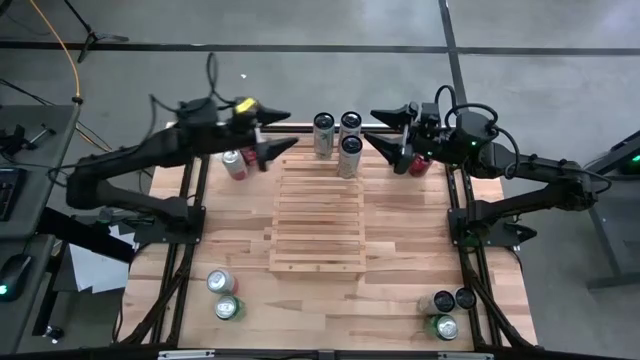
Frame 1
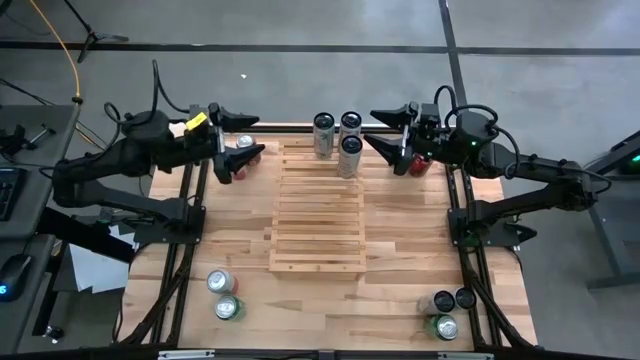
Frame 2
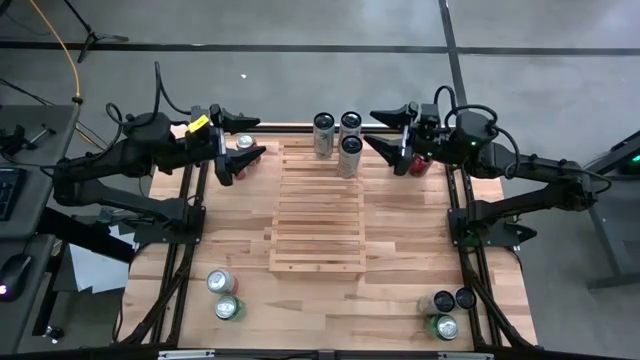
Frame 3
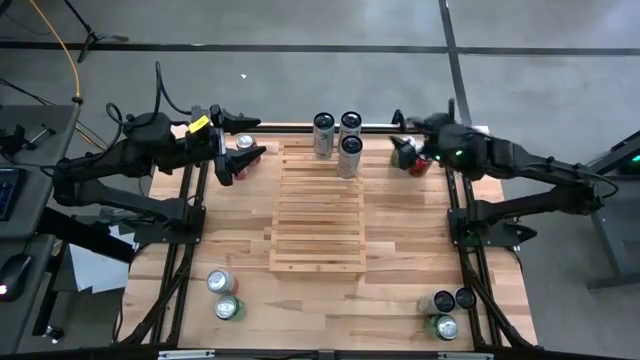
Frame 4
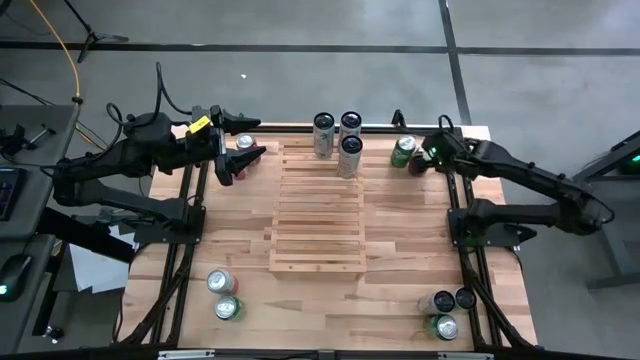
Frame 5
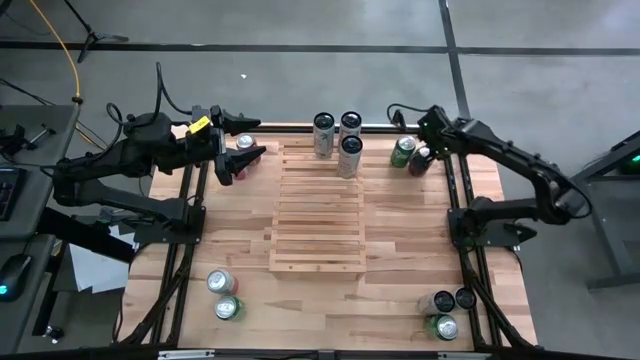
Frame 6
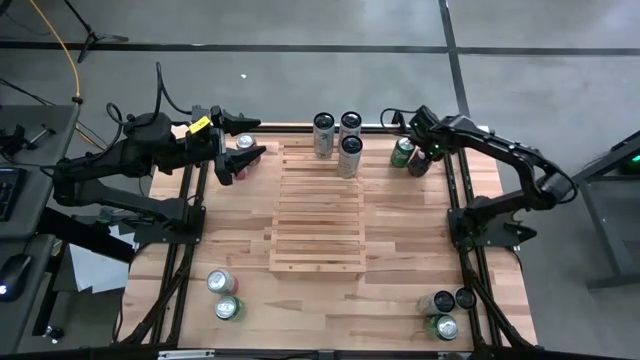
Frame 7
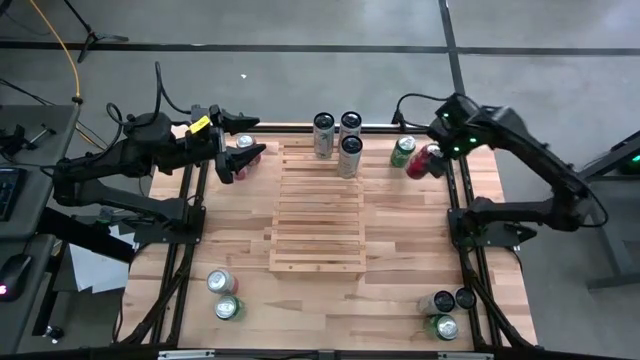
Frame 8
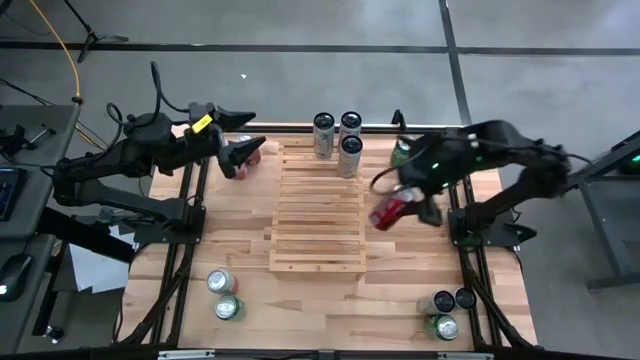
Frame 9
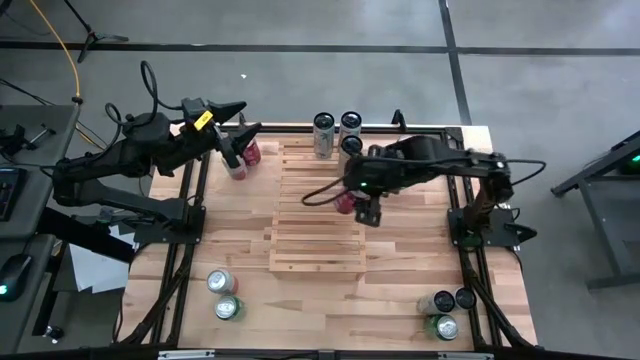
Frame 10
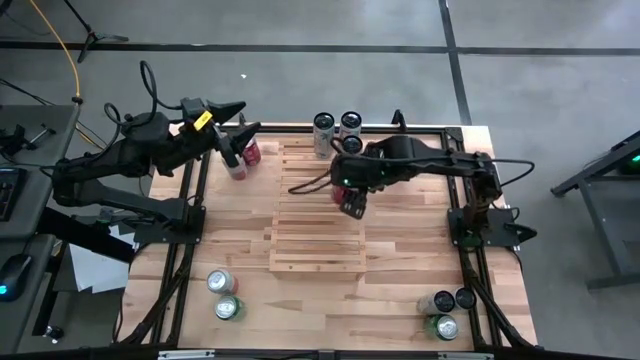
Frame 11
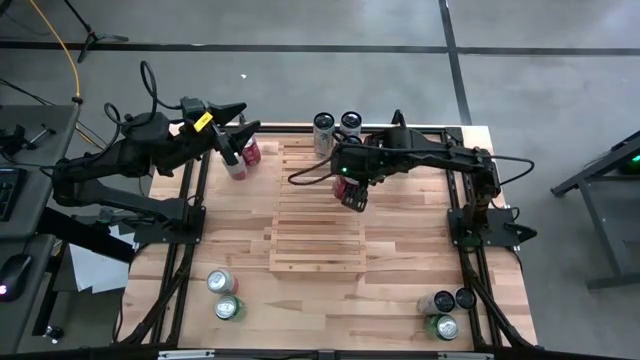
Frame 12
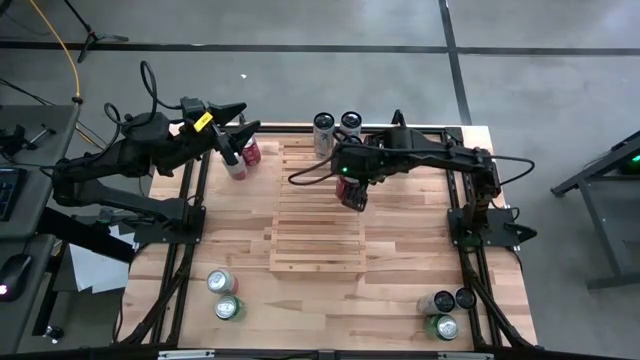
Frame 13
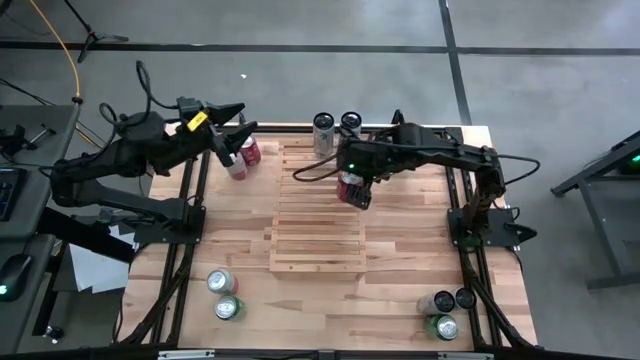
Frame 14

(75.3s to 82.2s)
Task: Place canned beverage on shelf
Put the red white soda can on the shelf

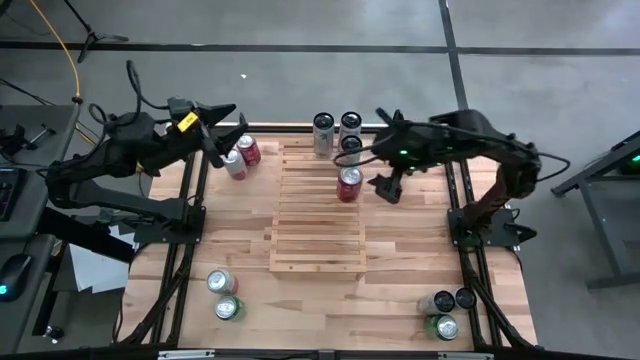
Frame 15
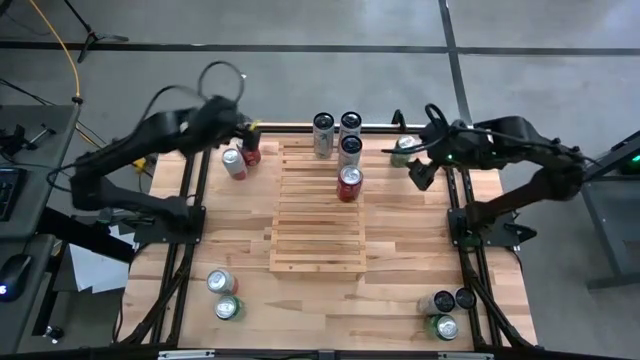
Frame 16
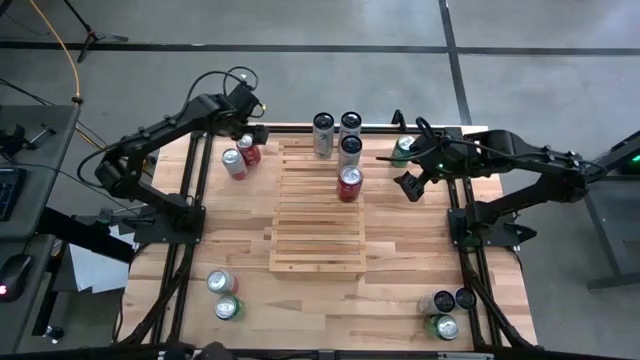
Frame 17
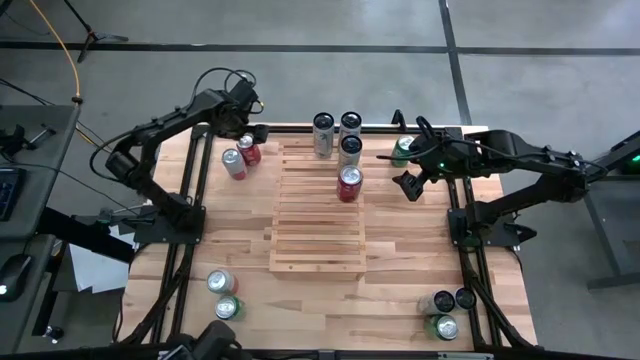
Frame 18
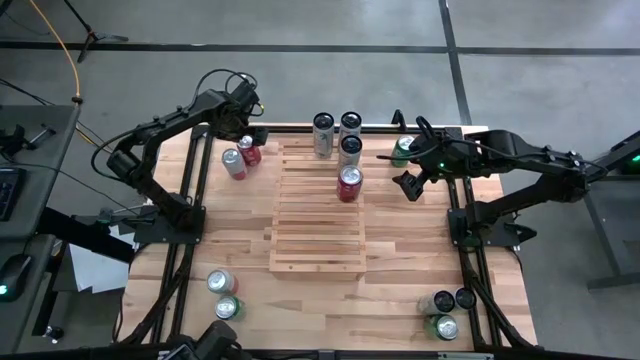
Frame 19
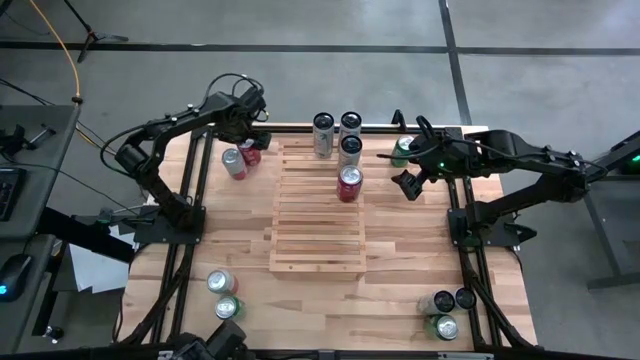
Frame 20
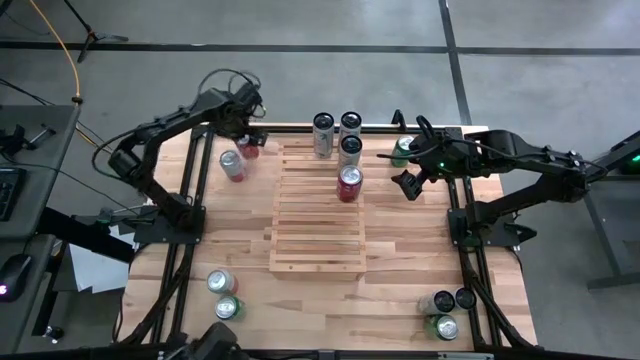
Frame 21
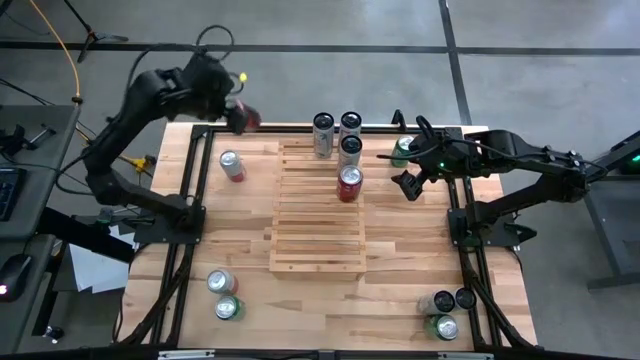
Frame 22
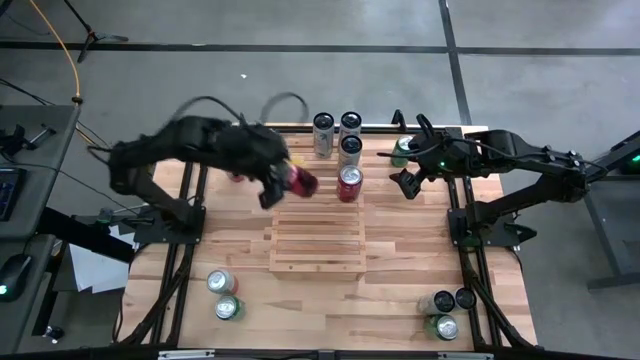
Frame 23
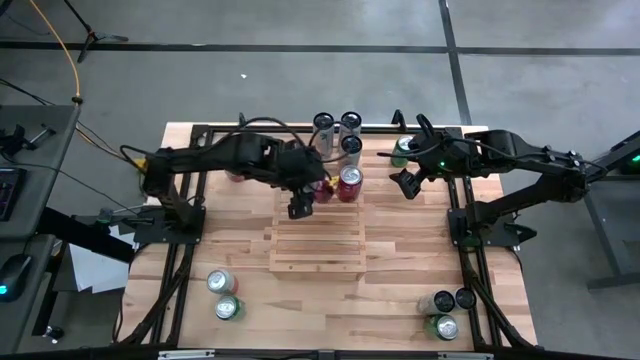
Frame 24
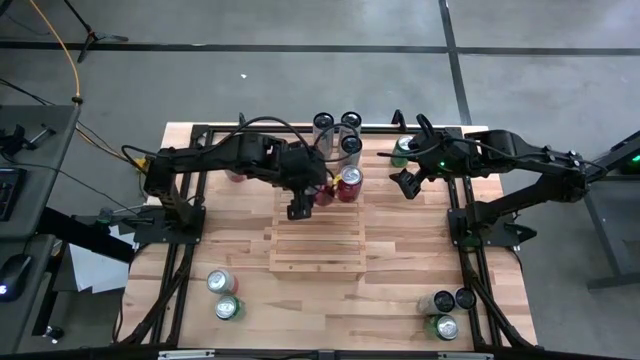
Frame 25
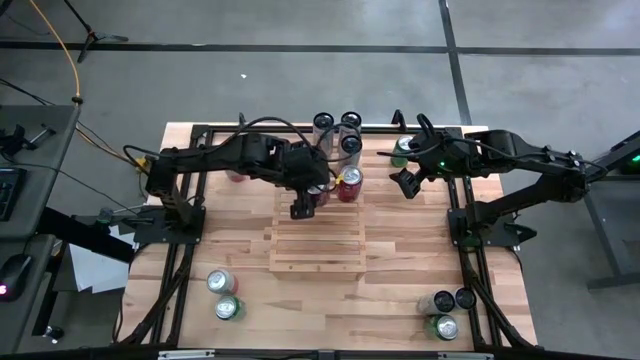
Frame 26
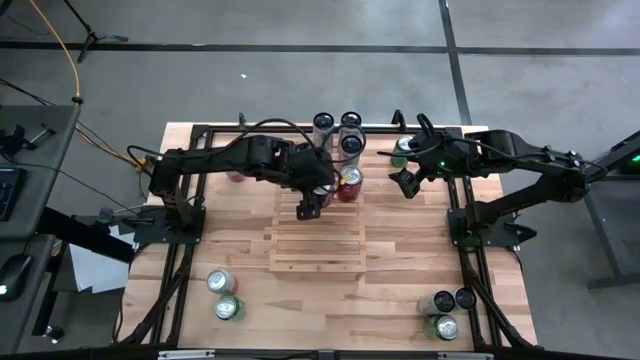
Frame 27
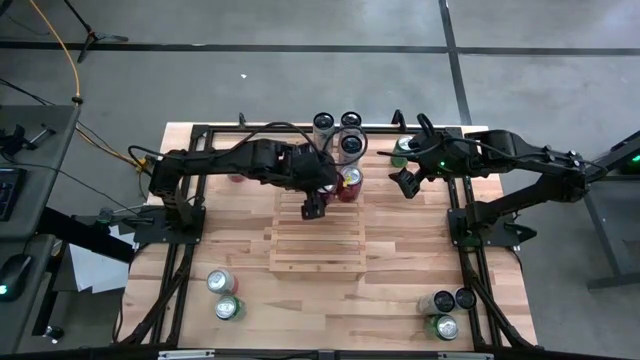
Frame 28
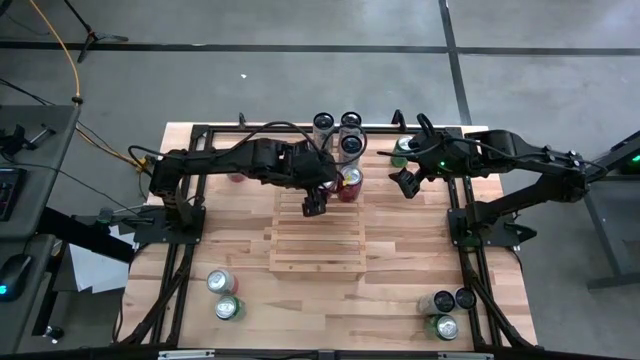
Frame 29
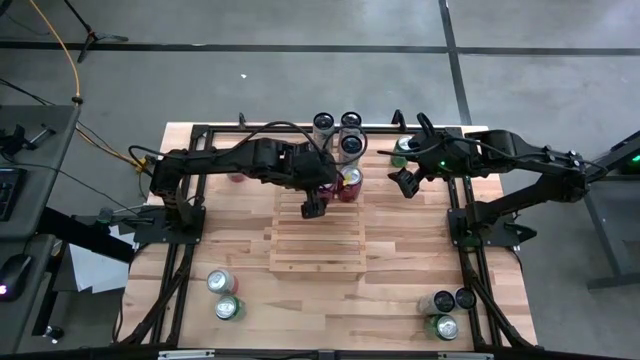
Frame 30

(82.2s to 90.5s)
Put the red white soda can on the shelf

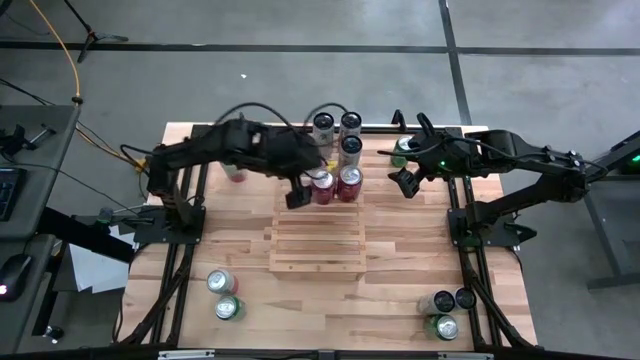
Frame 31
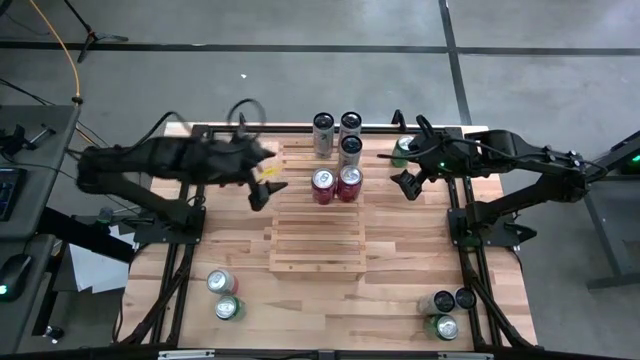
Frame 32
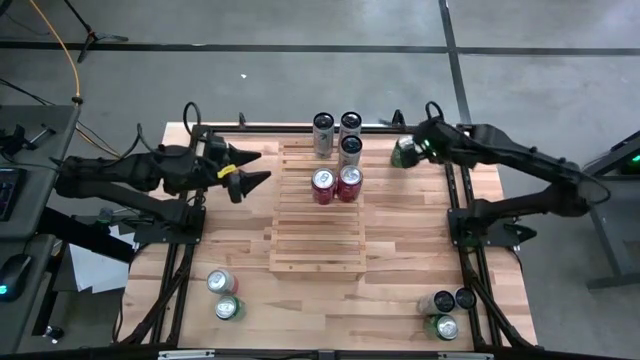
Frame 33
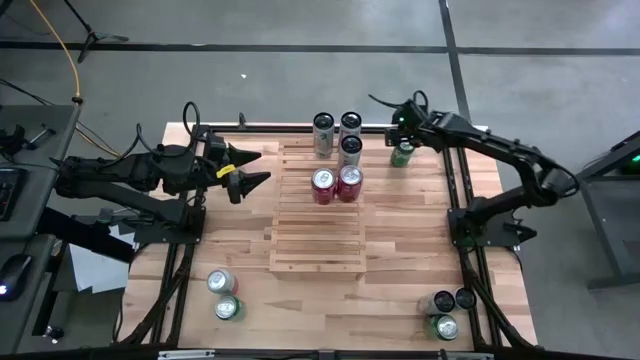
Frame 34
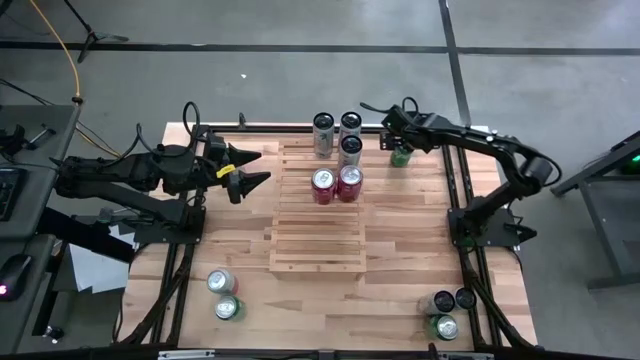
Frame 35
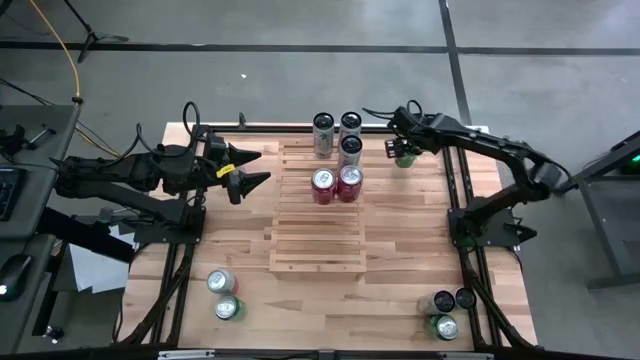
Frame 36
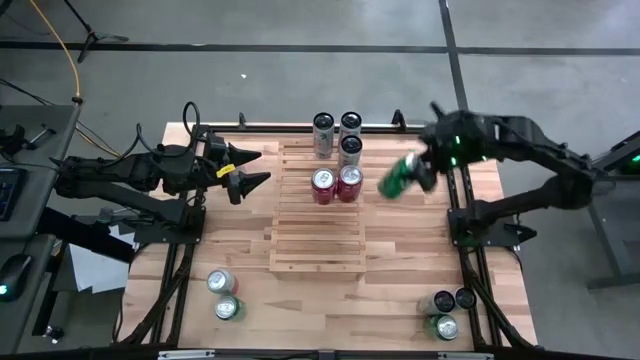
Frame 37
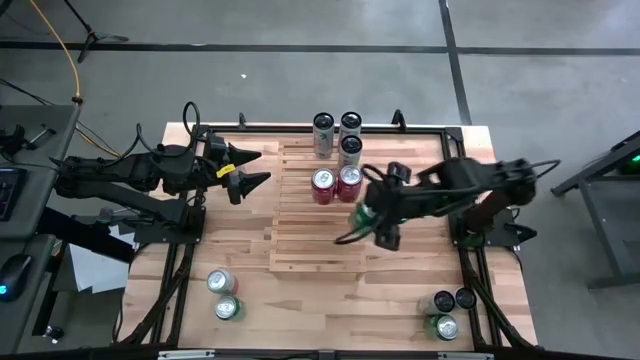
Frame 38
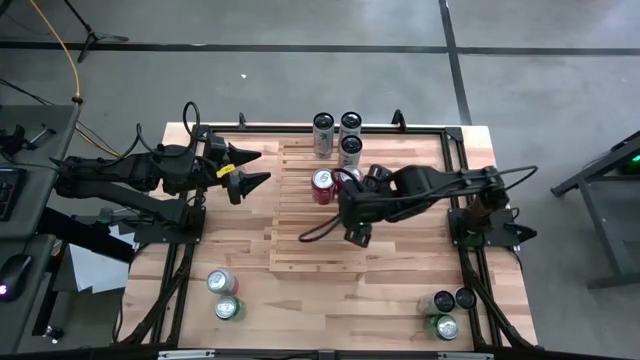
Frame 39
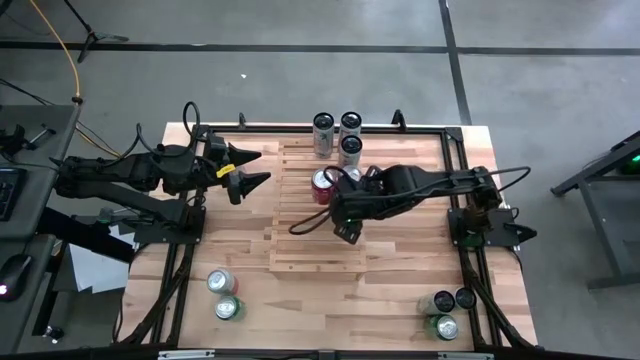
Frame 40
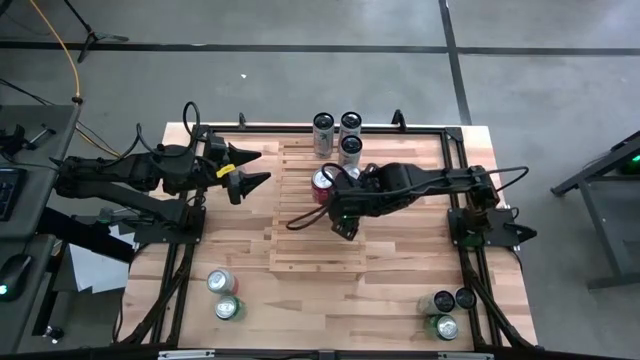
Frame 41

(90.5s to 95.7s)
Put the green white soda can on the shelf
